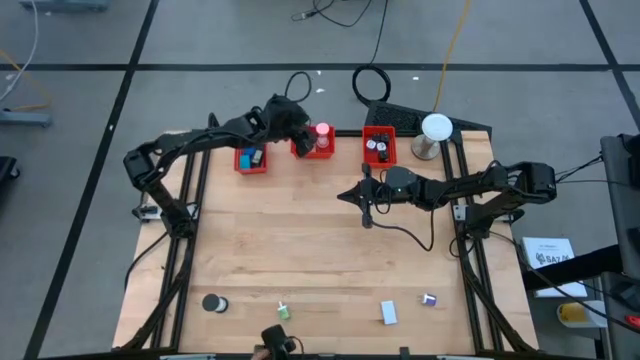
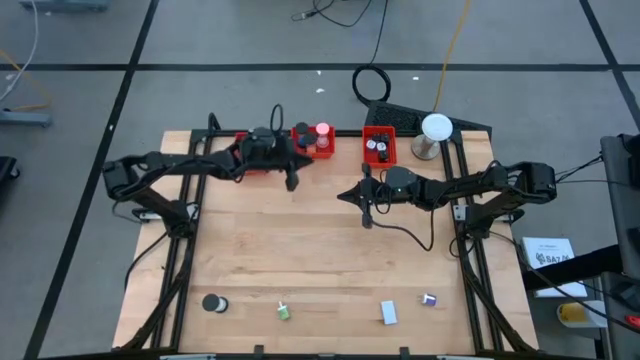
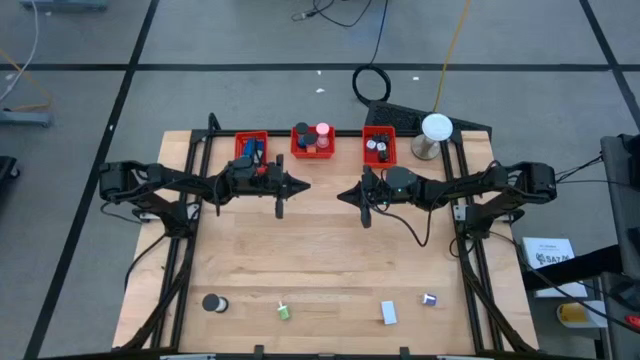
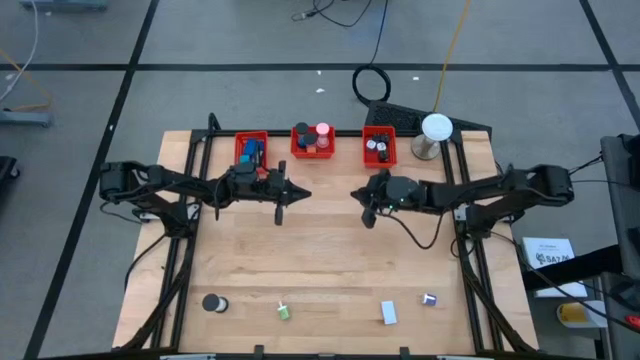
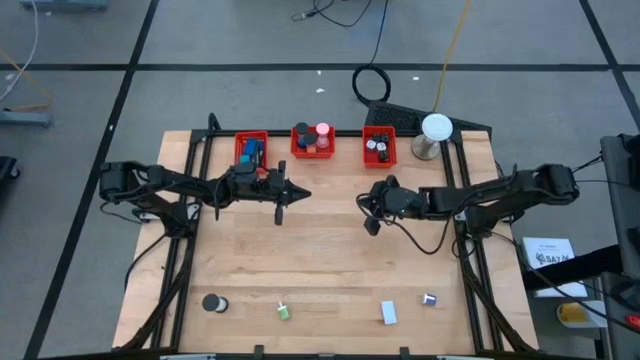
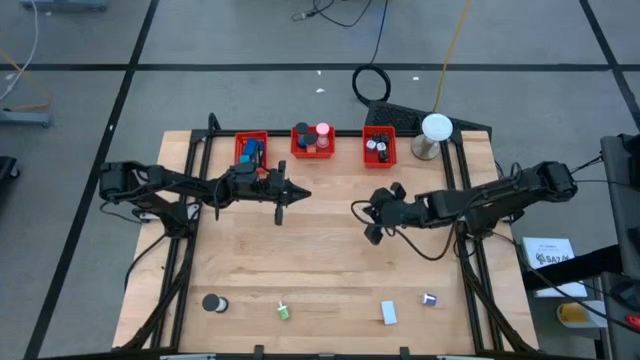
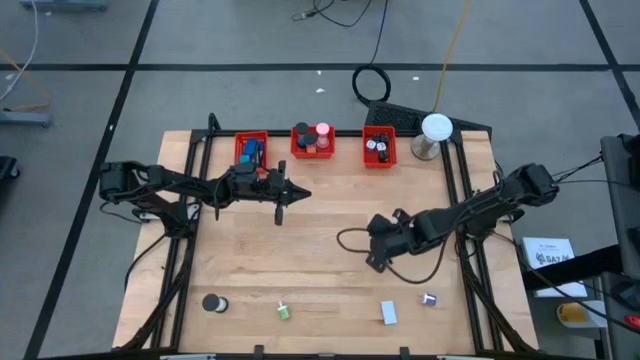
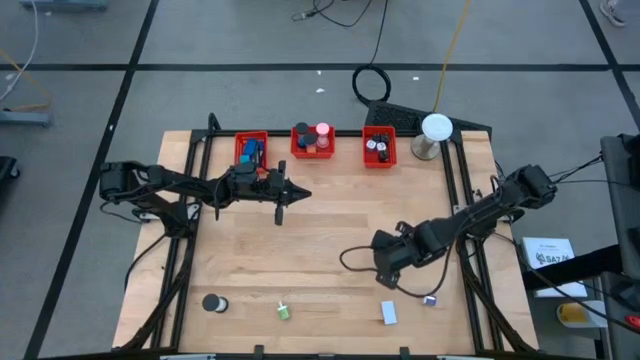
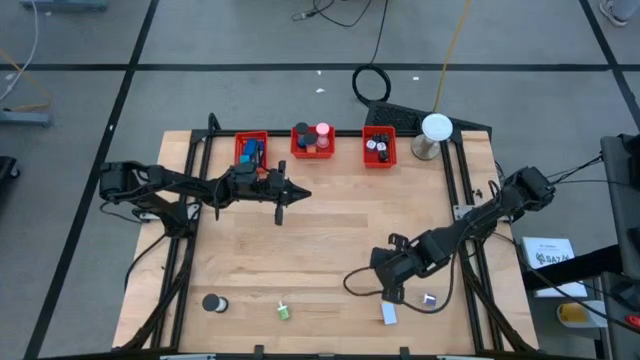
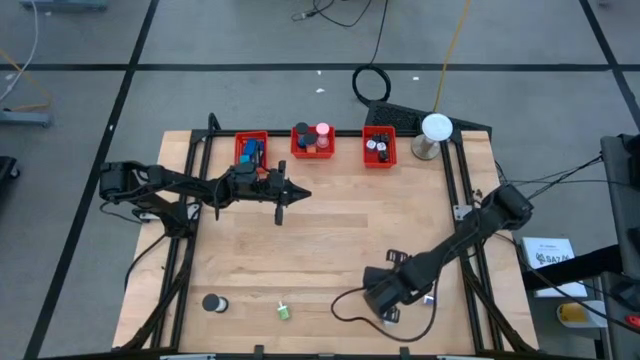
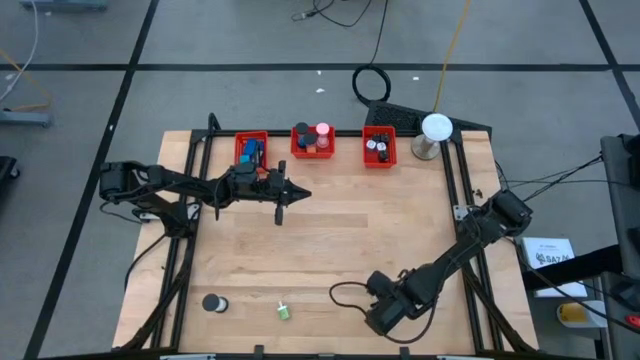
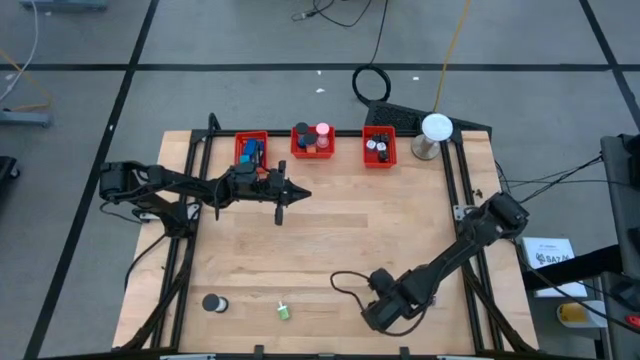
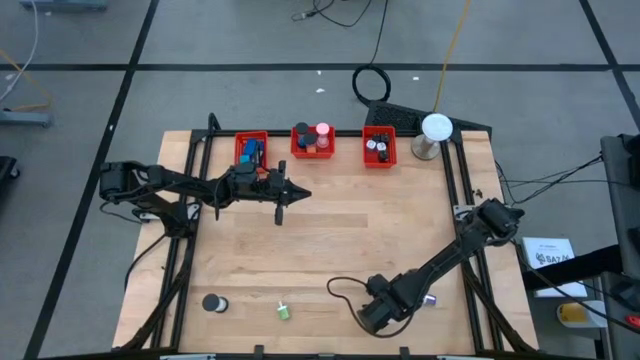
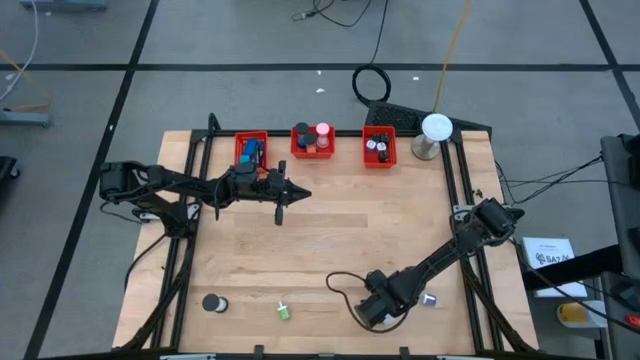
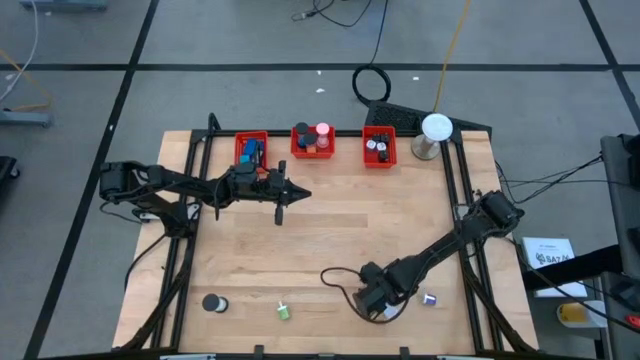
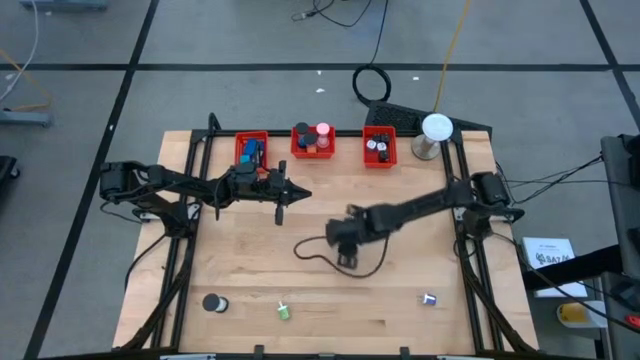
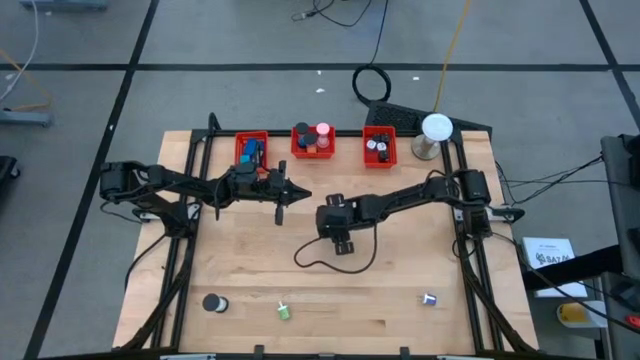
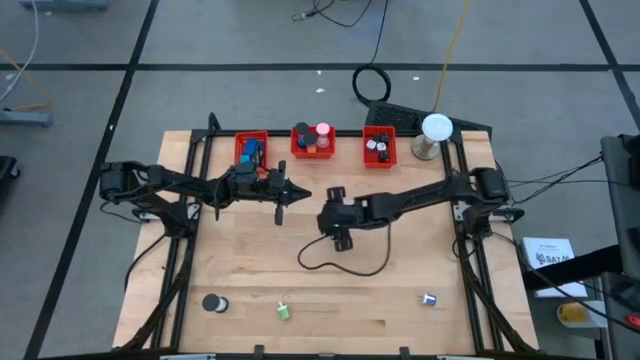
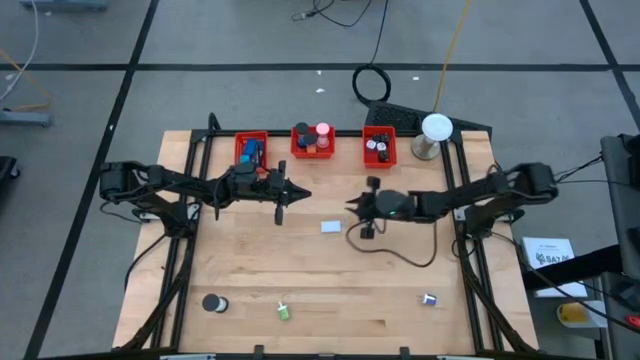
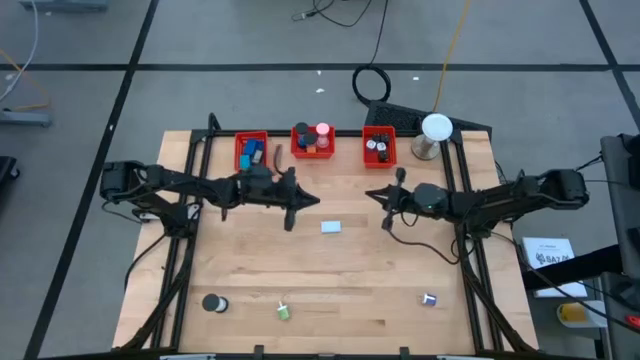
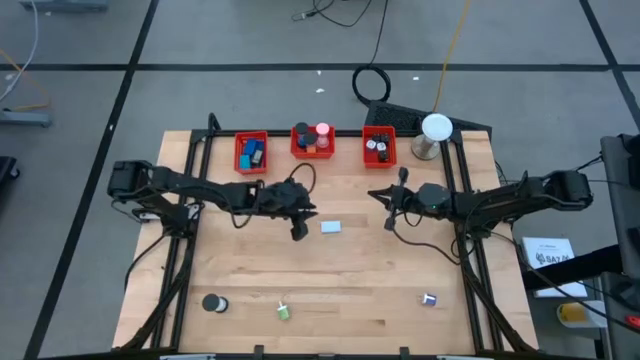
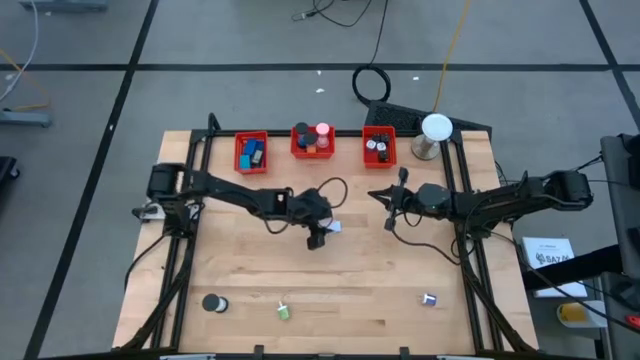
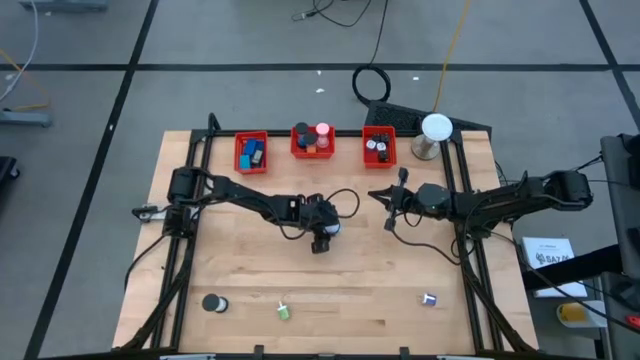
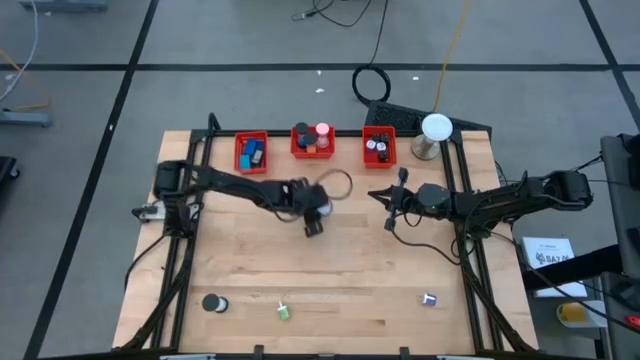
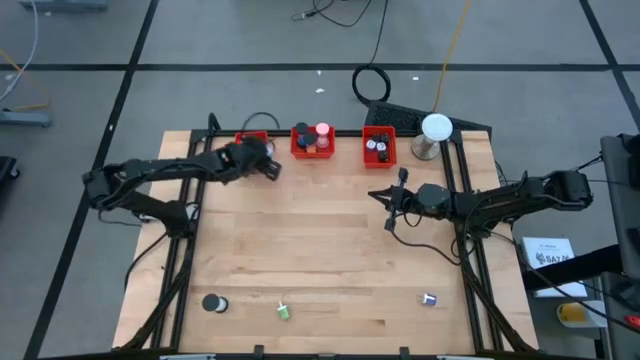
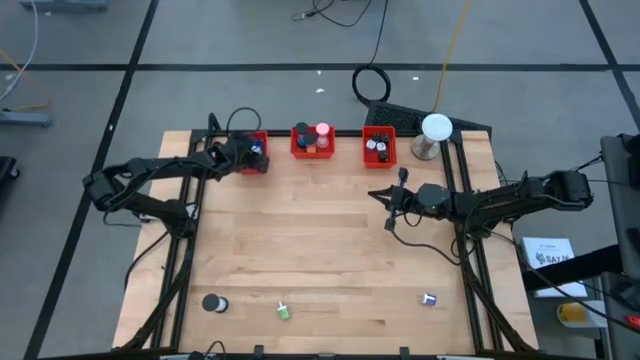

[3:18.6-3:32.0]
Task: Pick & Place Office items
Put the white timer into the left orange basket

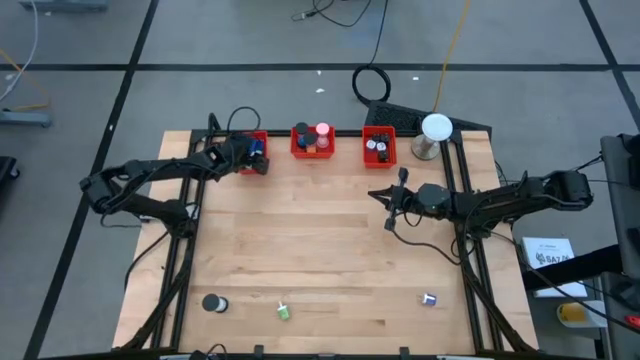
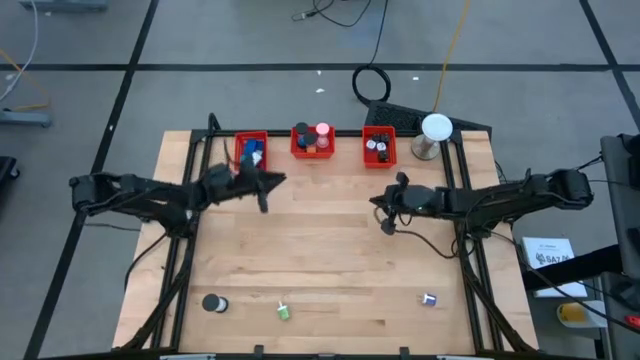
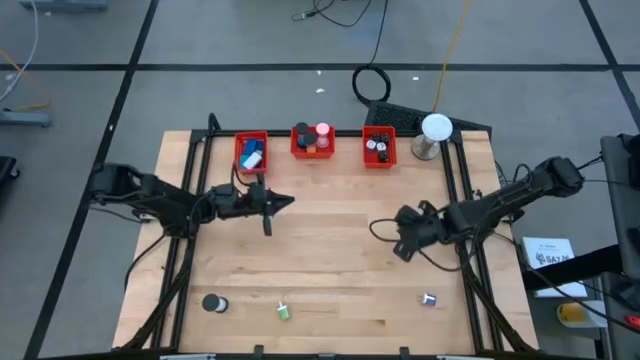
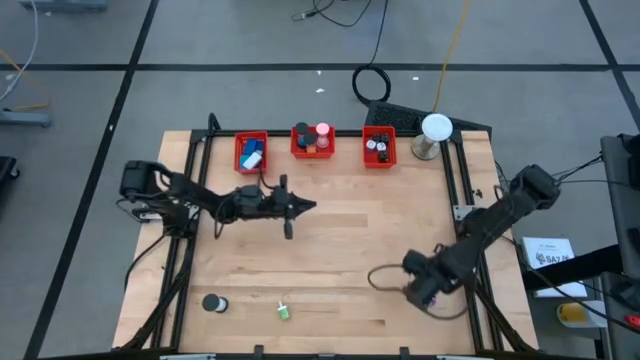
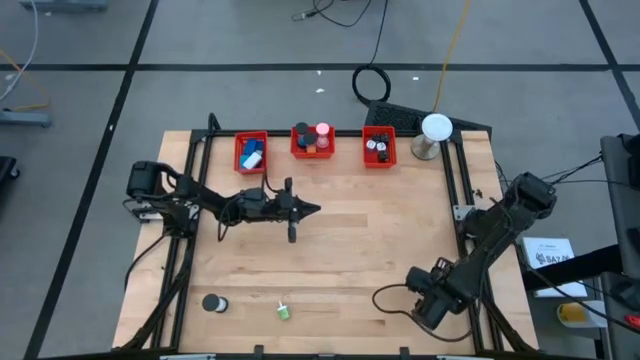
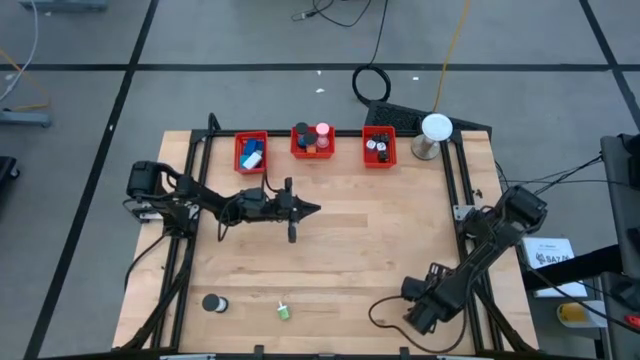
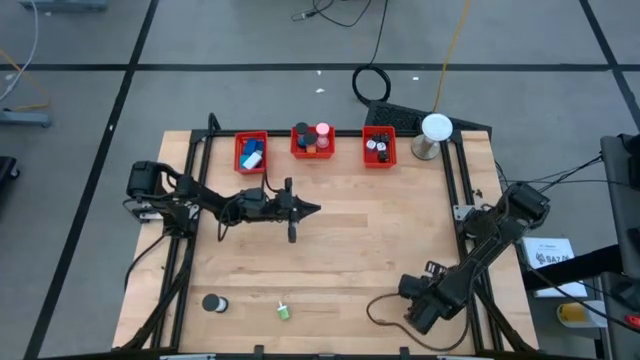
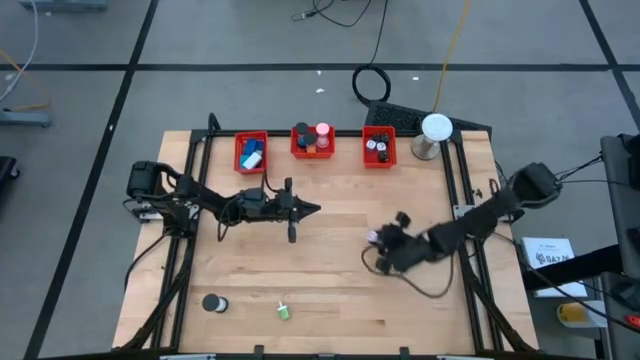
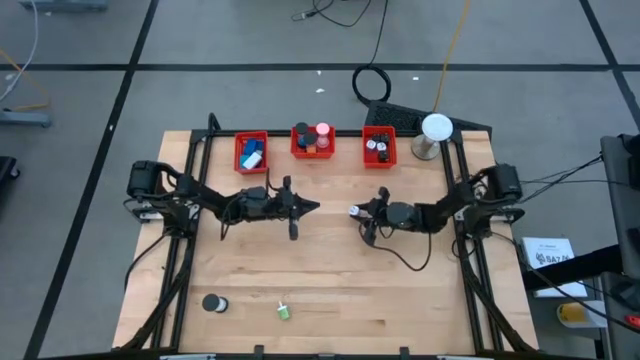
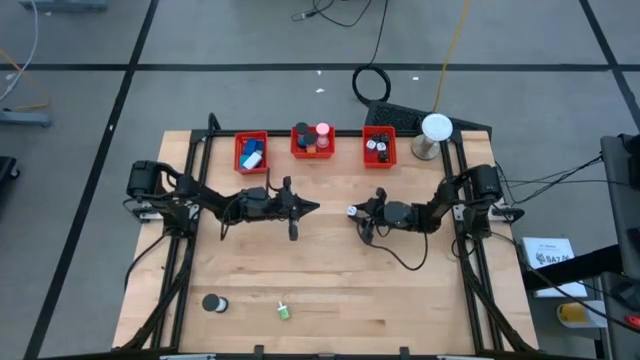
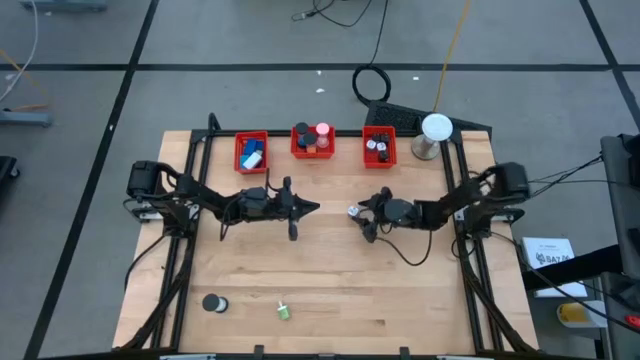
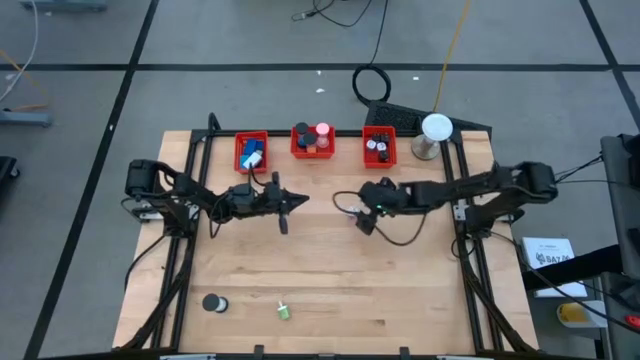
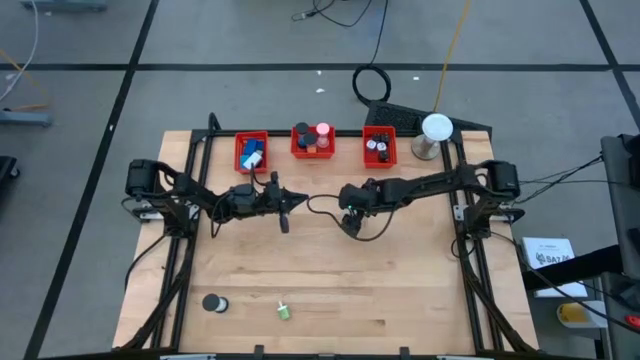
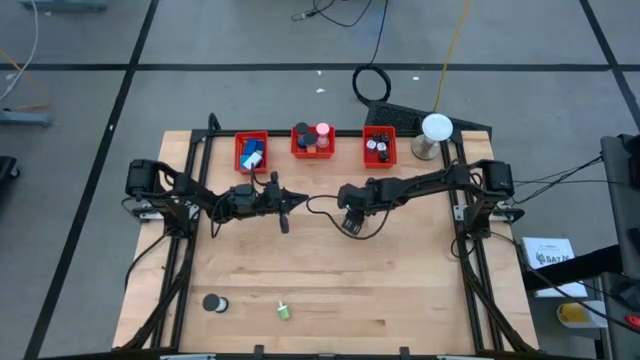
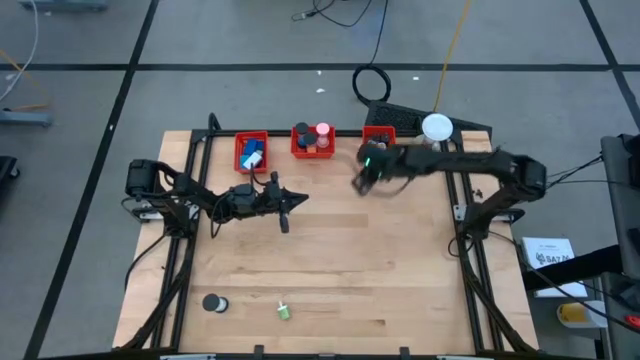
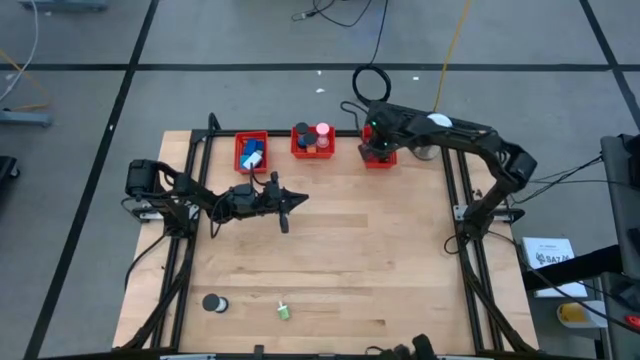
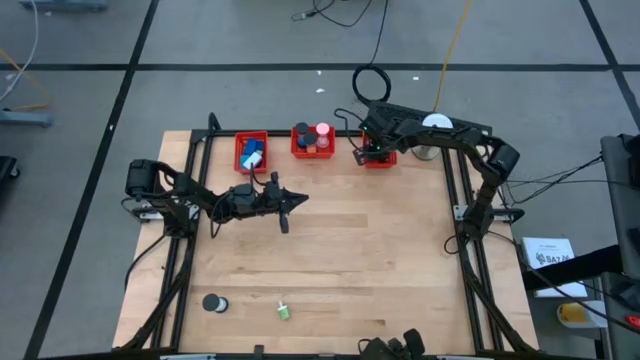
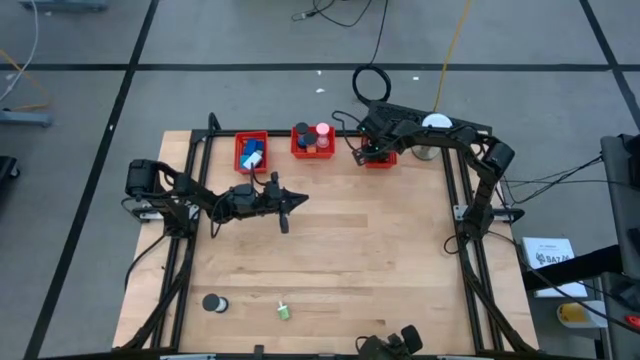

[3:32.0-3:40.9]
Put the blue charger adapter into the right orange basket
